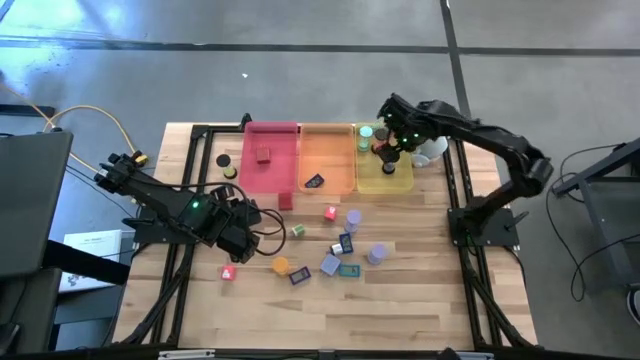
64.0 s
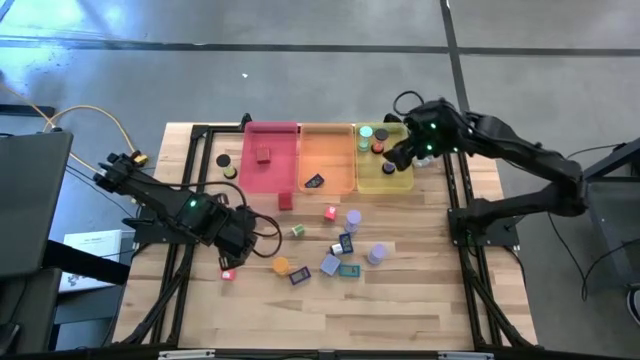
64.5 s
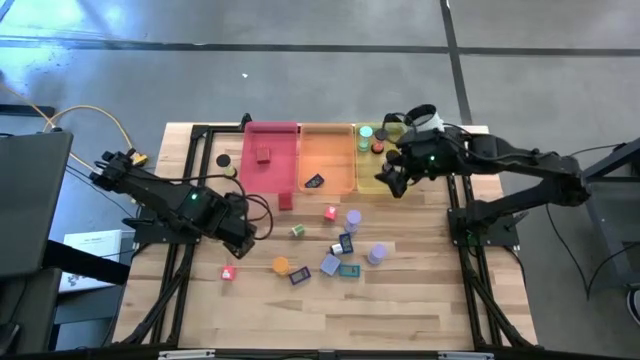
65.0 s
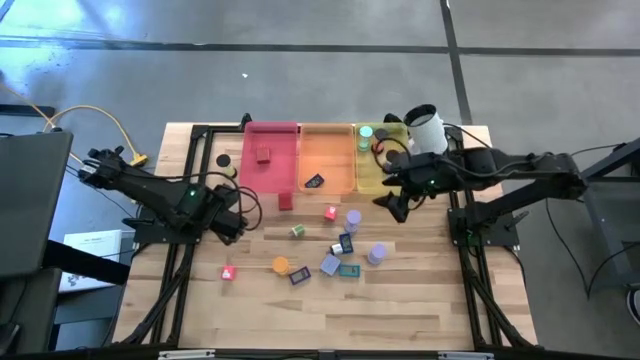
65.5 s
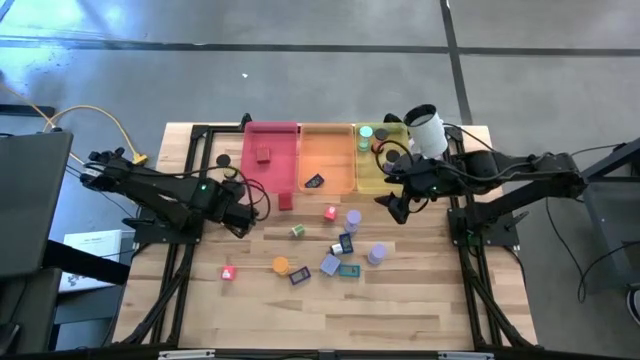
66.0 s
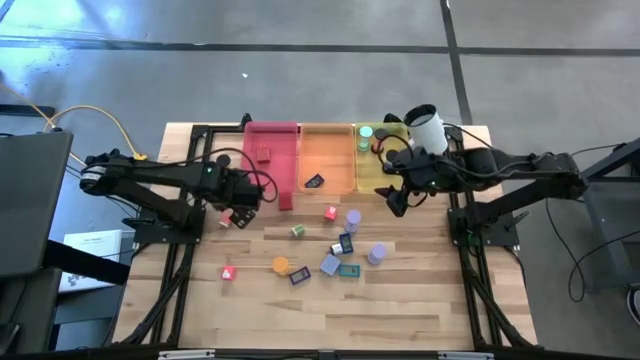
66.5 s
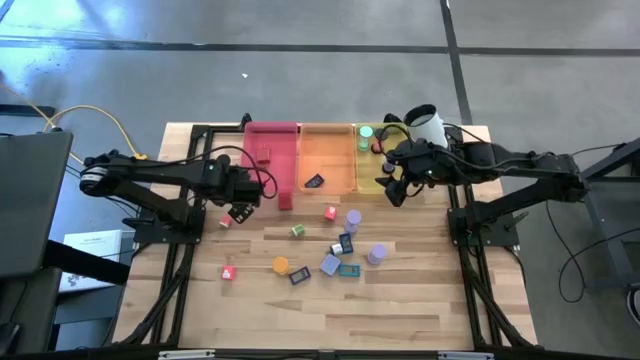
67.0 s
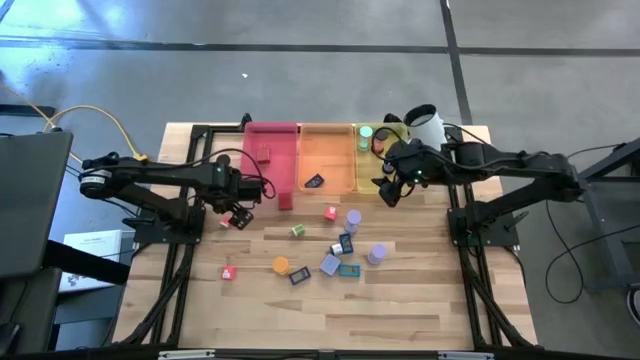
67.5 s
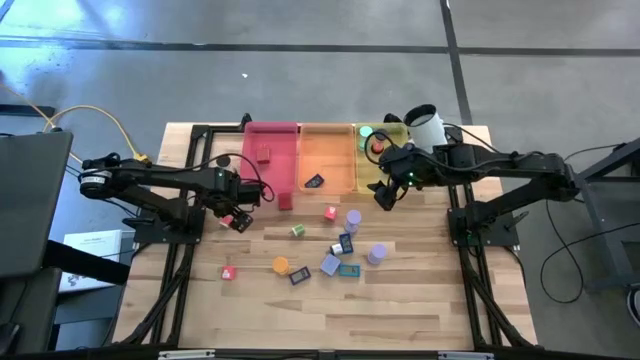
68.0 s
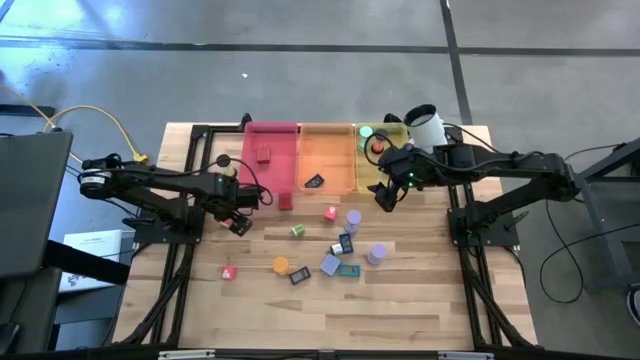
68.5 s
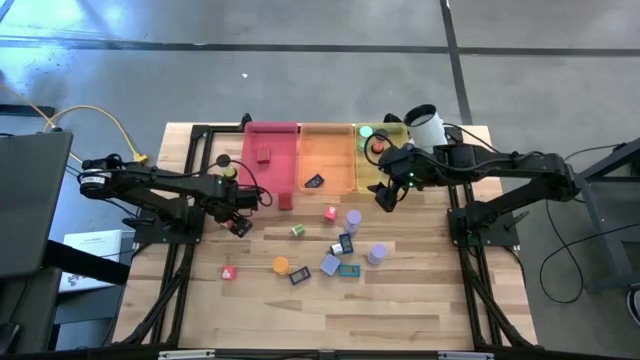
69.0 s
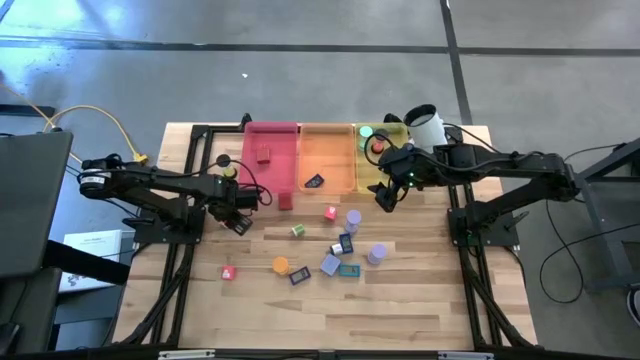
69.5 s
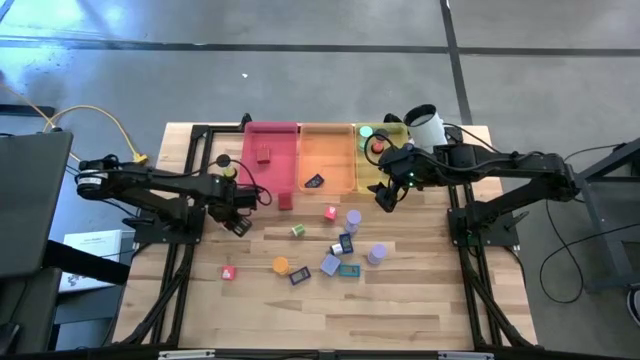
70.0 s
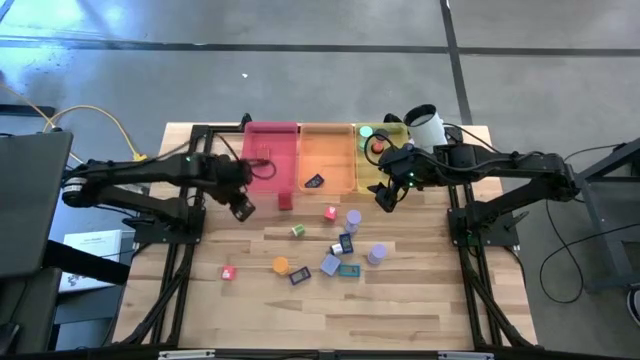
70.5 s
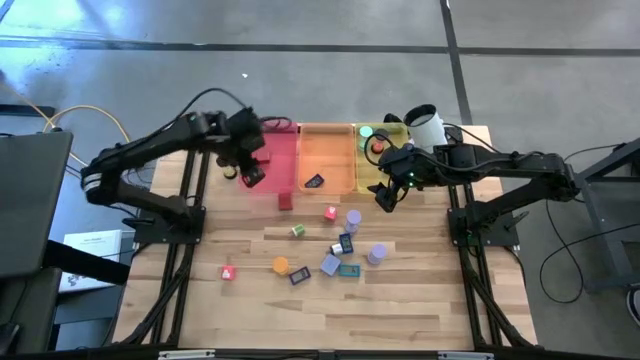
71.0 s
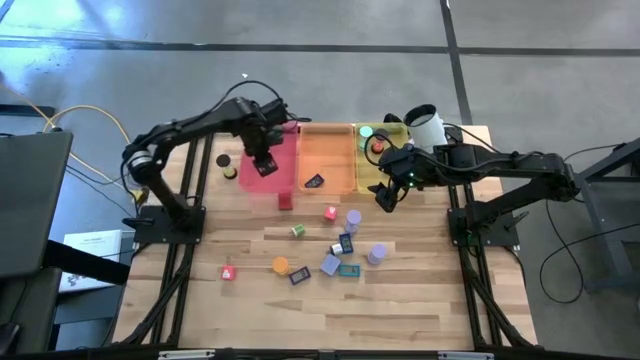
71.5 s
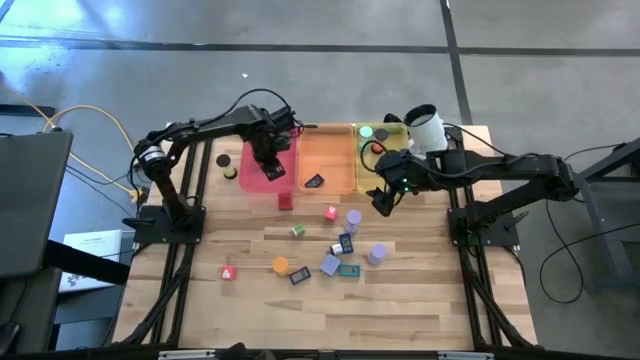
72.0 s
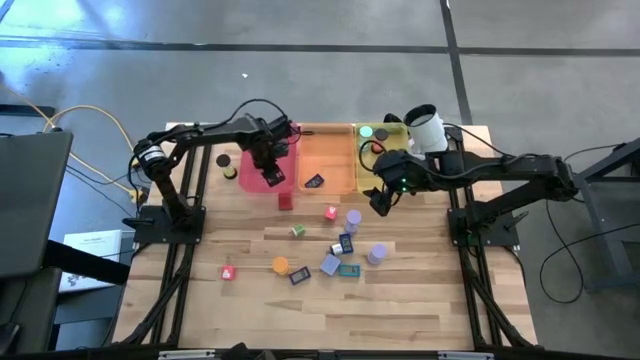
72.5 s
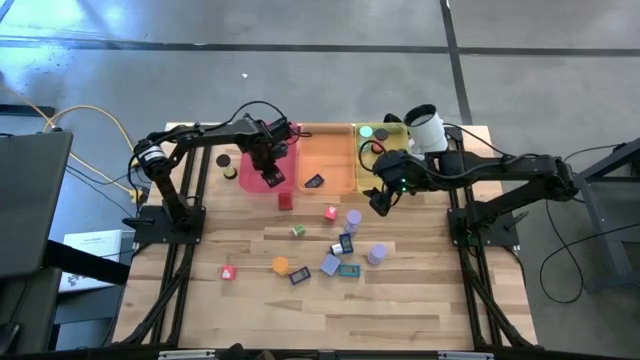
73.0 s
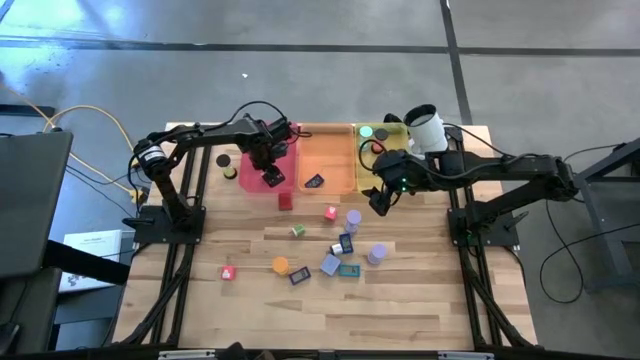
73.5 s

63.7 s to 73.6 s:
Task: Pick & Place Office items
Put the pink and white charger adapter into the pink bin

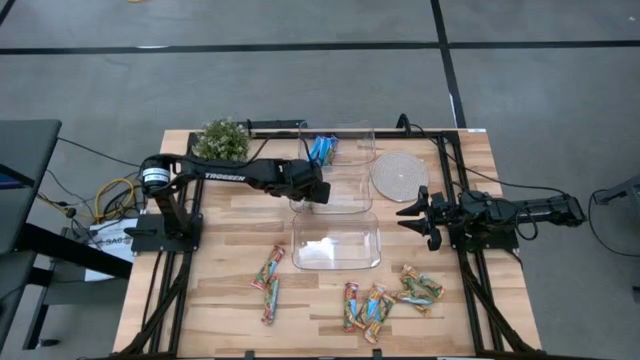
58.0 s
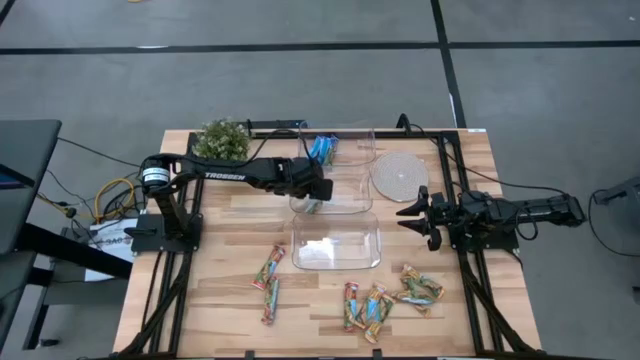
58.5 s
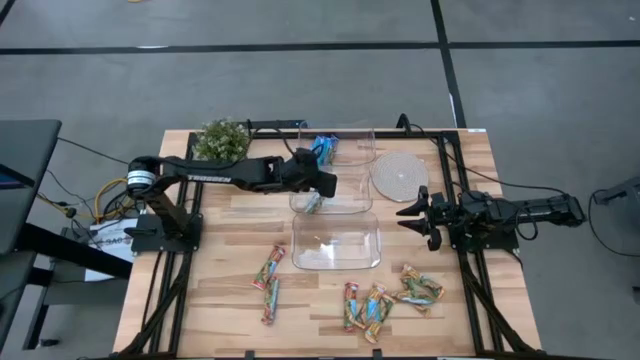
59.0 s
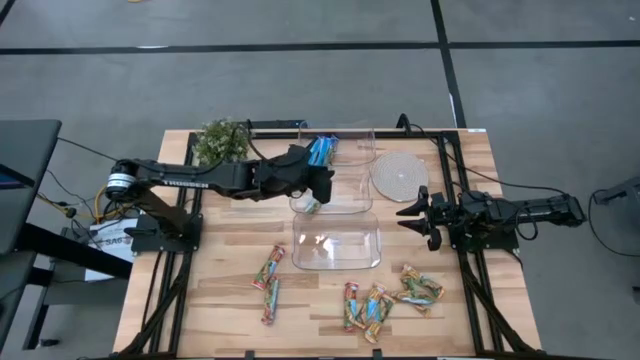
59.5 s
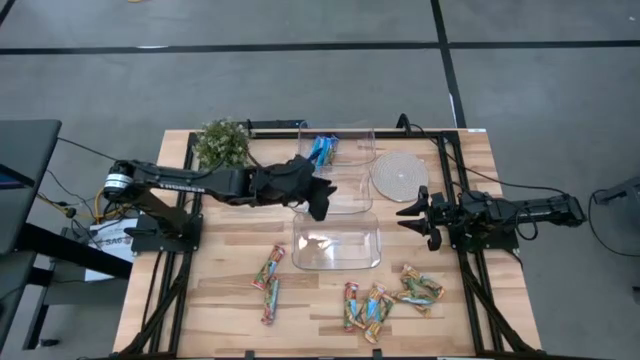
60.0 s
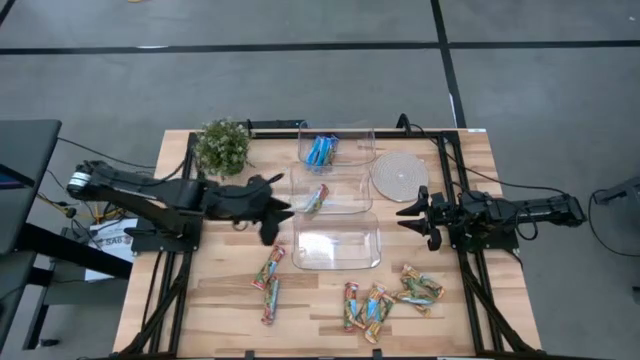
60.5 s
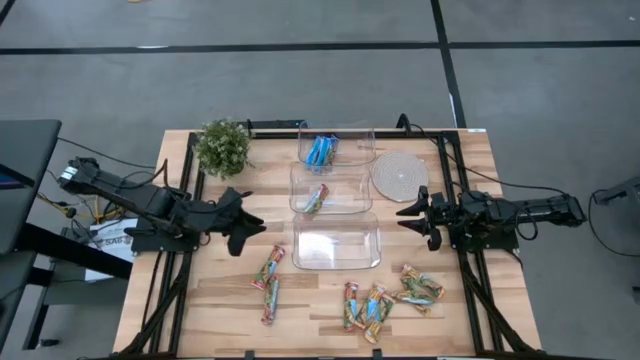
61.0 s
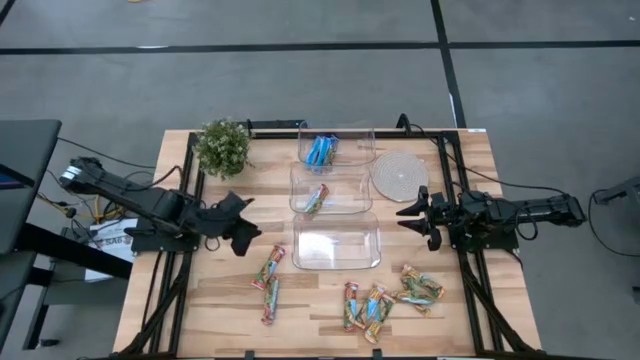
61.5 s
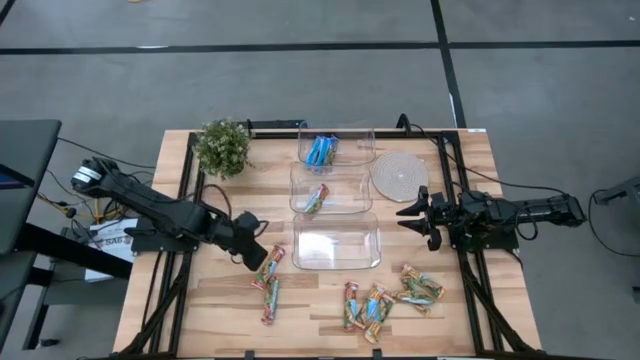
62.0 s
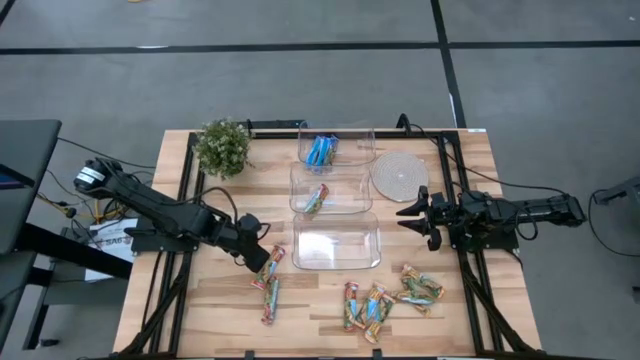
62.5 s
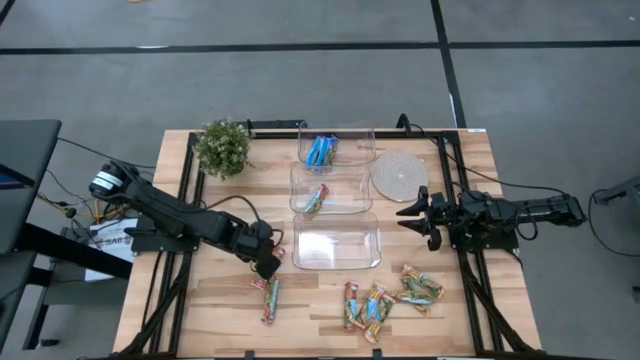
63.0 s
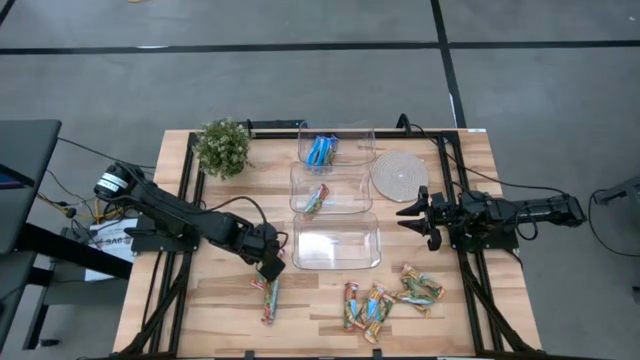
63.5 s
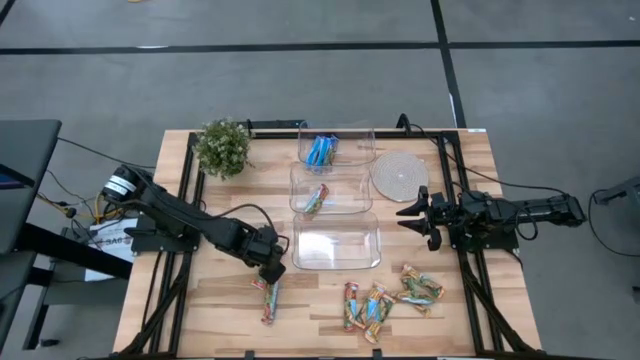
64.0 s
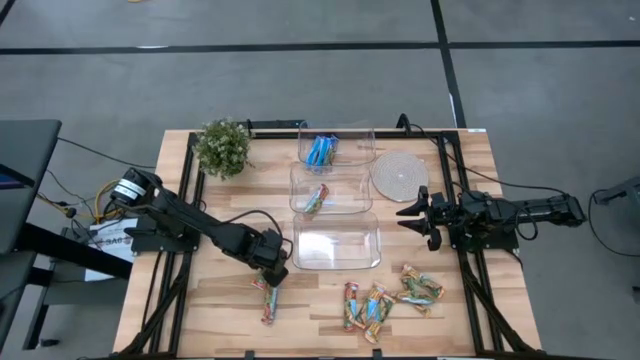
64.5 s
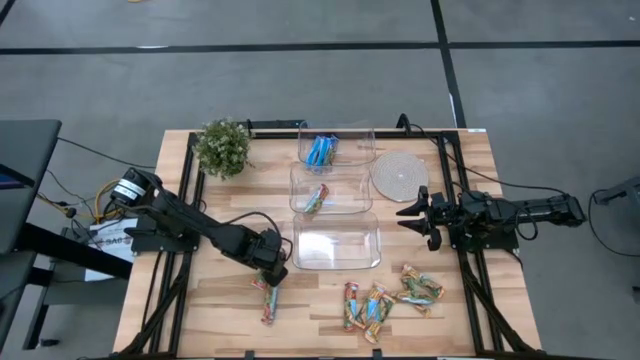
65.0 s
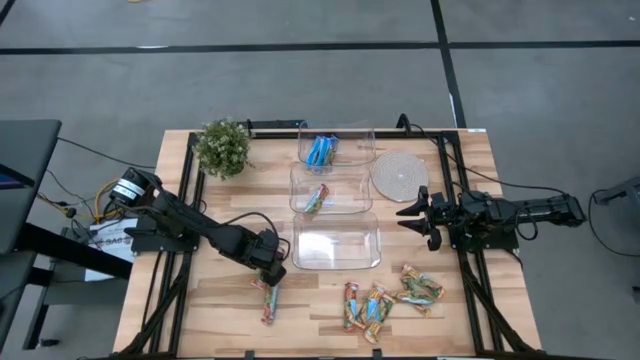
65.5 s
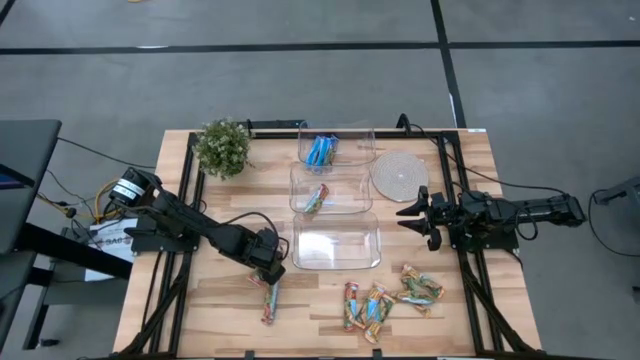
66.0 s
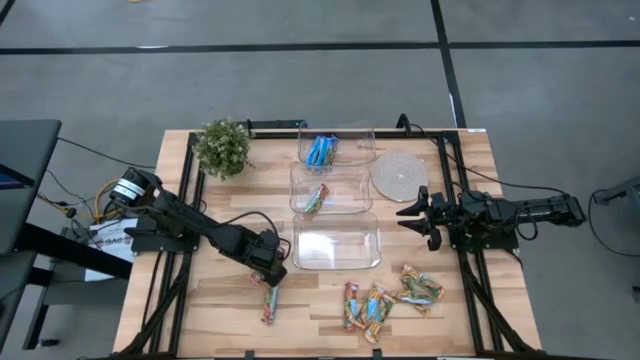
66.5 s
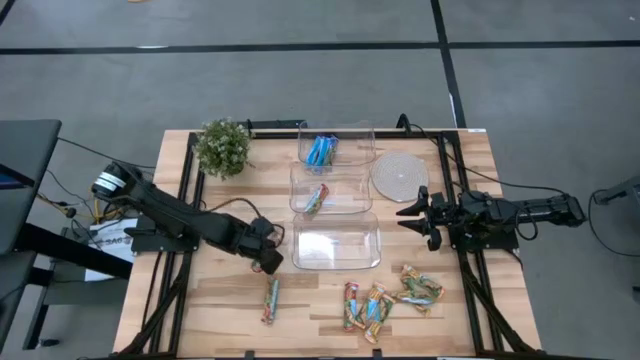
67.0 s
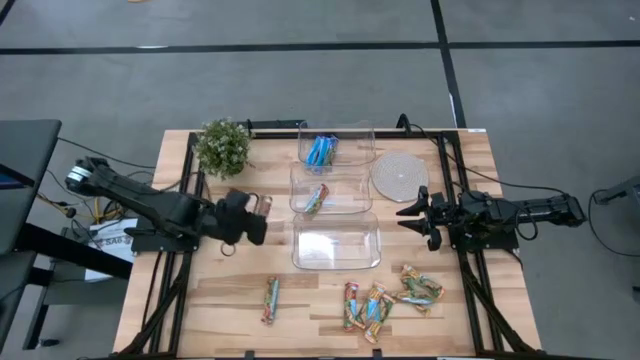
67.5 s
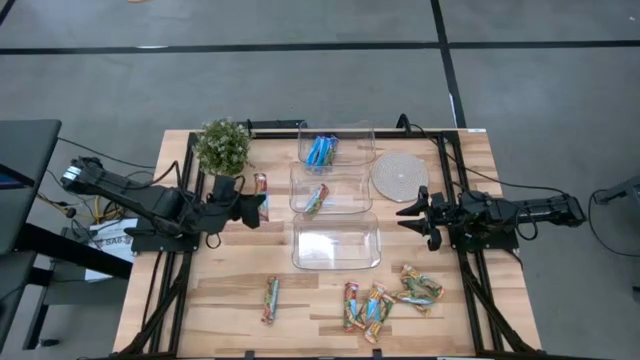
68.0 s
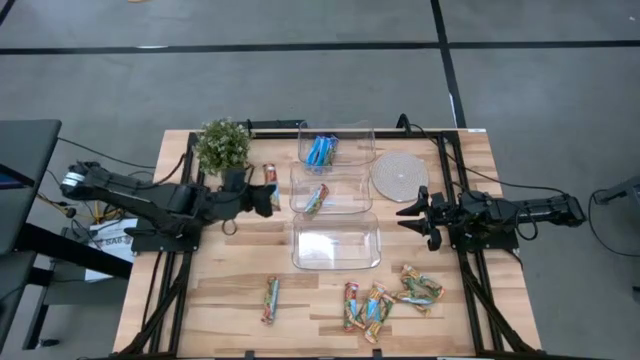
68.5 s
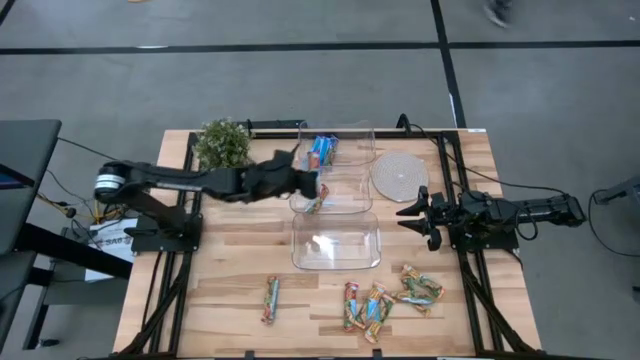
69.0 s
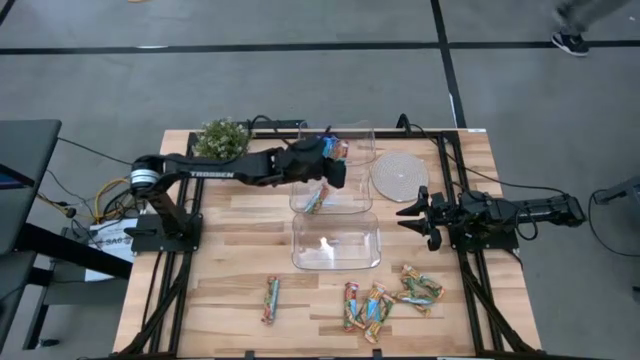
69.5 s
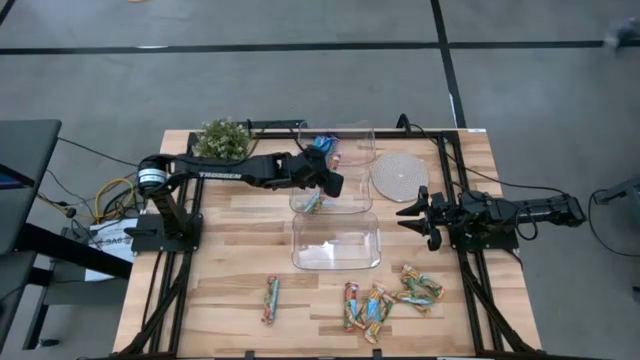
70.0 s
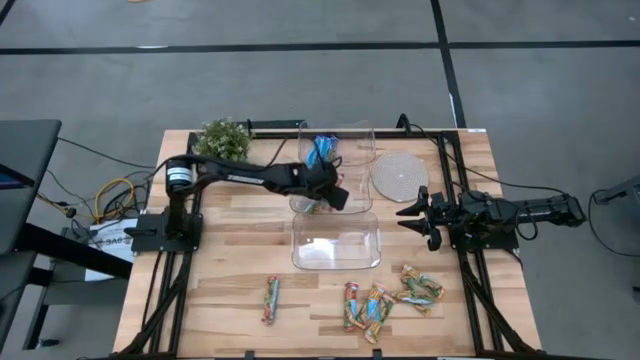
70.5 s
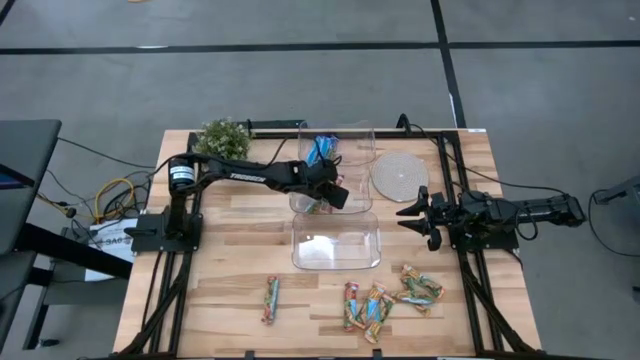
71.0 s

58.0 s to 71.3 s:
Task: Pick and place Granola Bars by type
Put the red granola bar into the middle transparent bin
